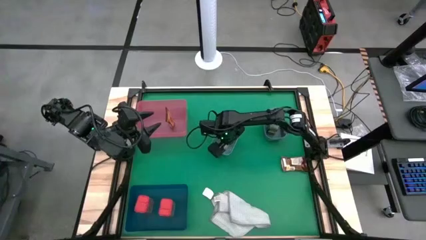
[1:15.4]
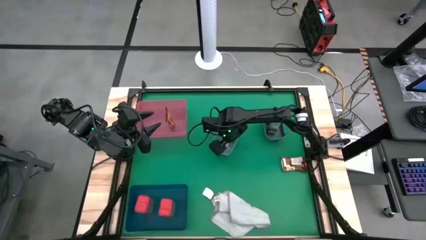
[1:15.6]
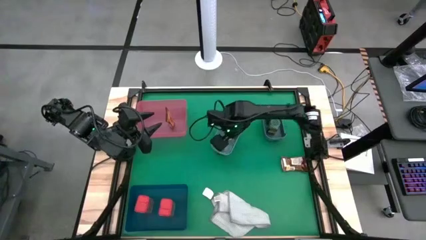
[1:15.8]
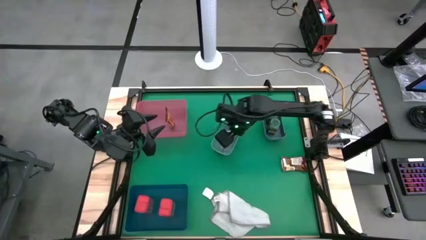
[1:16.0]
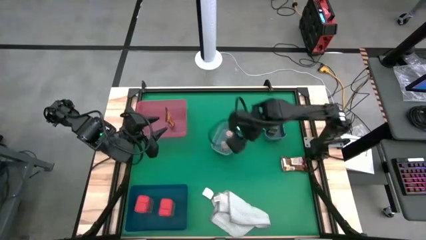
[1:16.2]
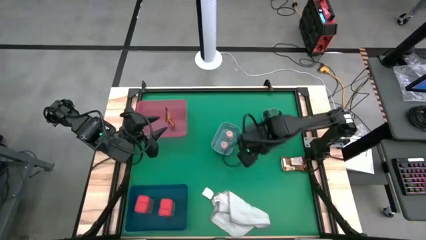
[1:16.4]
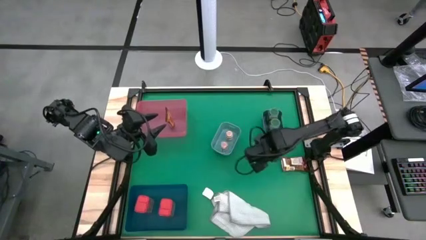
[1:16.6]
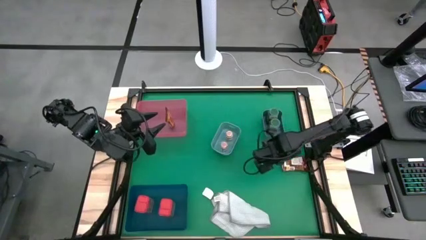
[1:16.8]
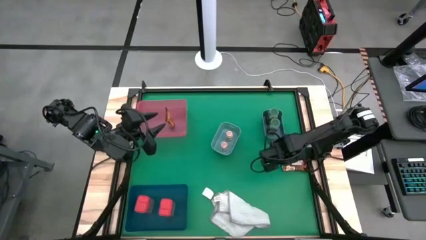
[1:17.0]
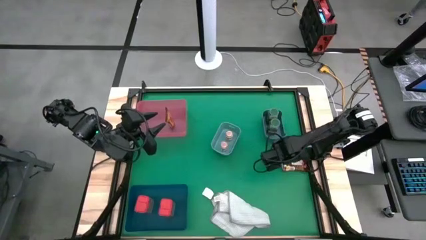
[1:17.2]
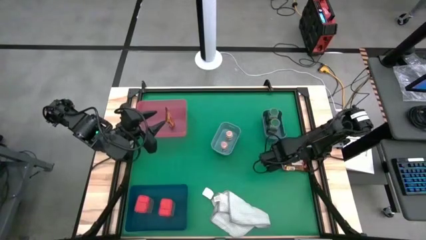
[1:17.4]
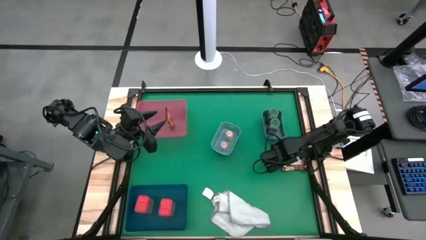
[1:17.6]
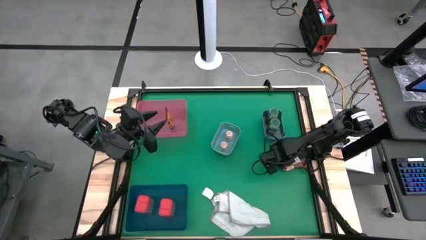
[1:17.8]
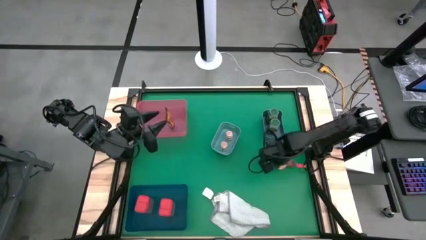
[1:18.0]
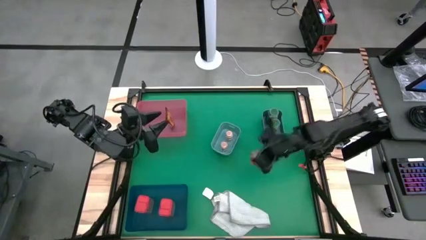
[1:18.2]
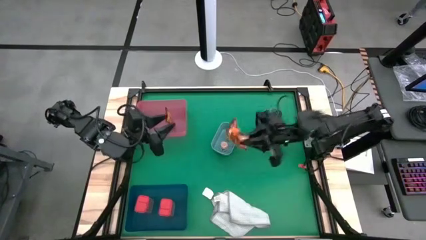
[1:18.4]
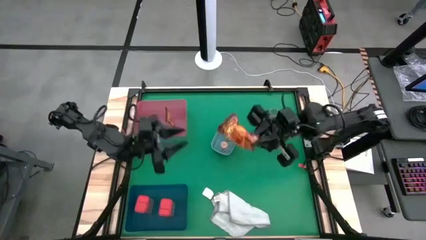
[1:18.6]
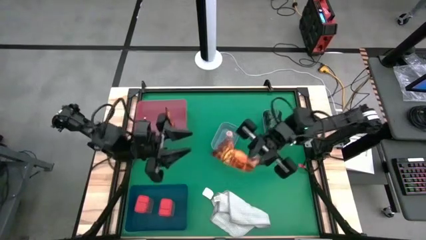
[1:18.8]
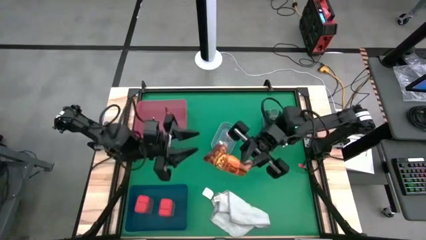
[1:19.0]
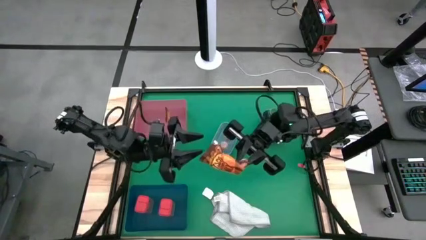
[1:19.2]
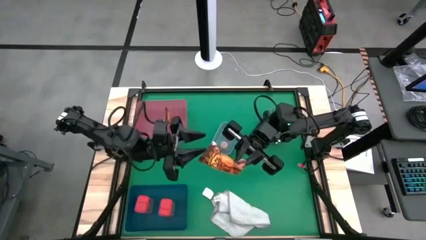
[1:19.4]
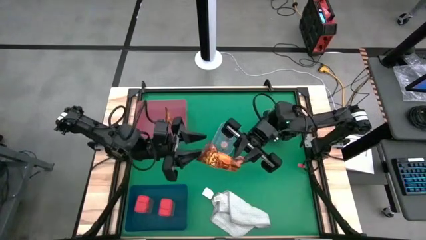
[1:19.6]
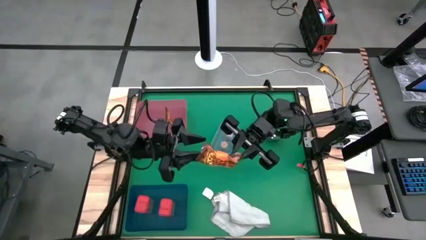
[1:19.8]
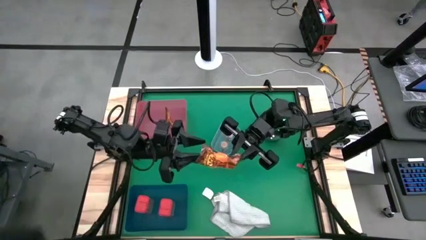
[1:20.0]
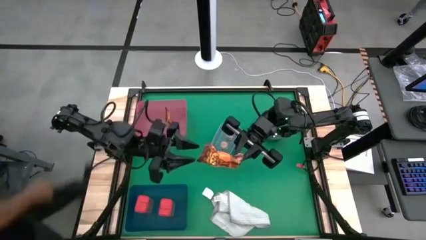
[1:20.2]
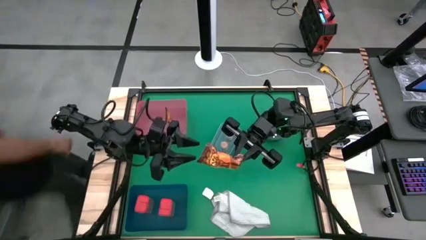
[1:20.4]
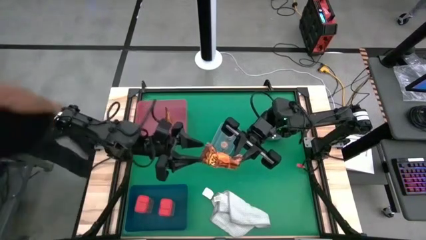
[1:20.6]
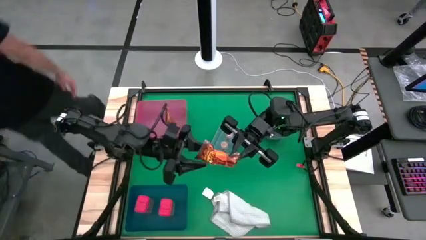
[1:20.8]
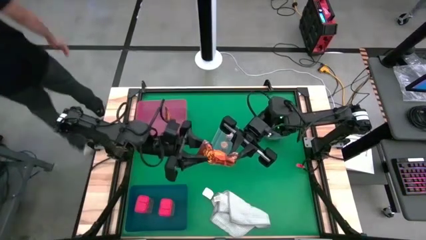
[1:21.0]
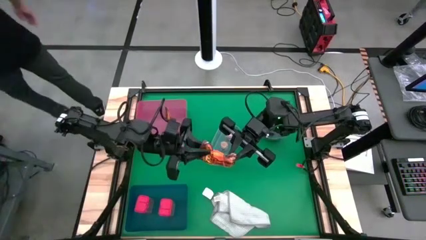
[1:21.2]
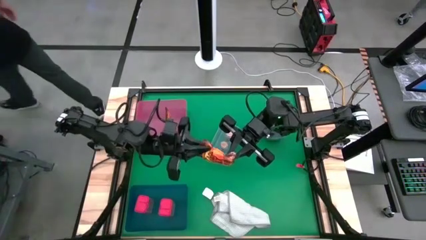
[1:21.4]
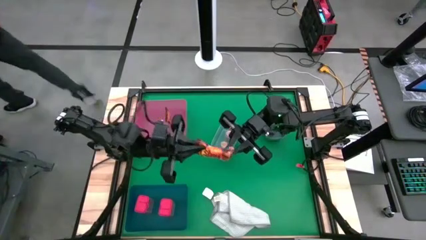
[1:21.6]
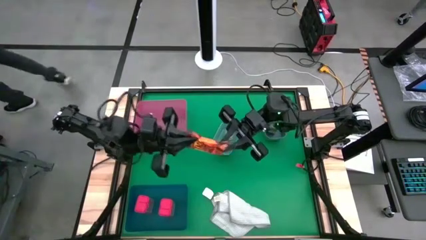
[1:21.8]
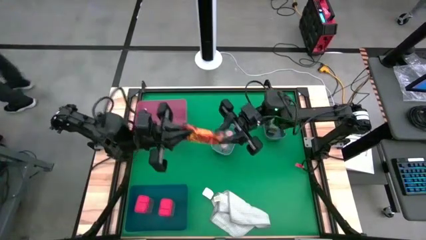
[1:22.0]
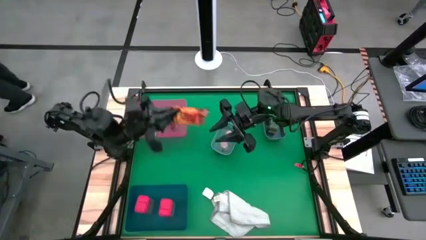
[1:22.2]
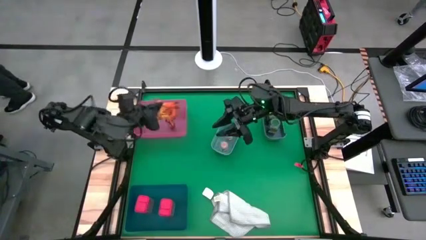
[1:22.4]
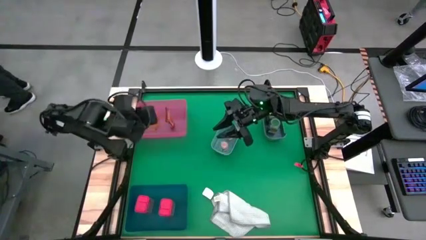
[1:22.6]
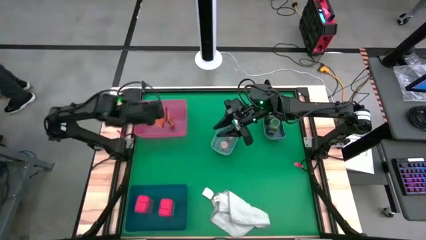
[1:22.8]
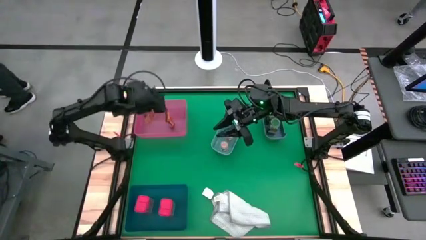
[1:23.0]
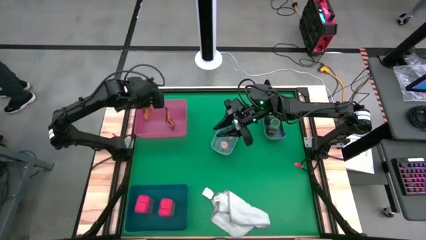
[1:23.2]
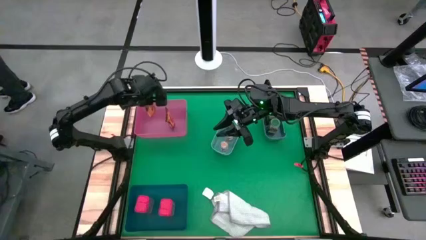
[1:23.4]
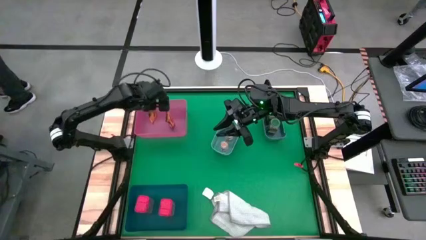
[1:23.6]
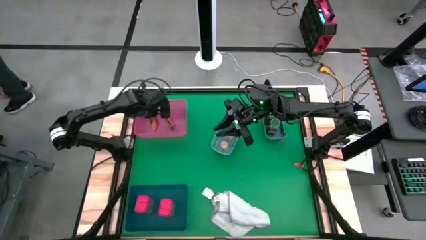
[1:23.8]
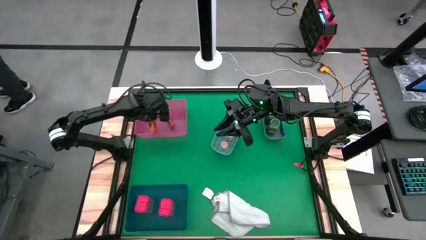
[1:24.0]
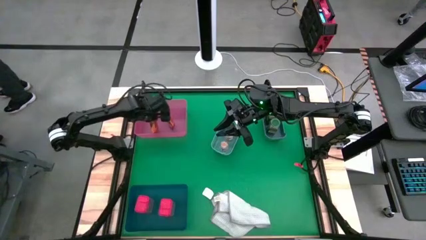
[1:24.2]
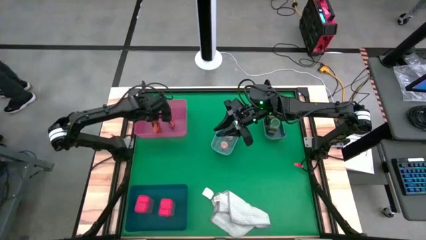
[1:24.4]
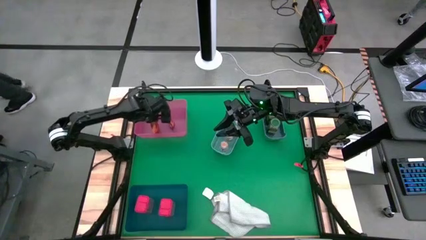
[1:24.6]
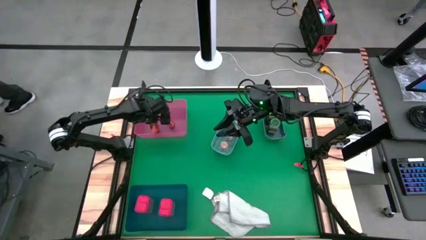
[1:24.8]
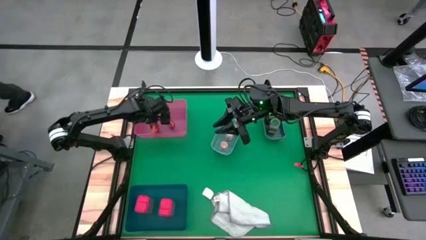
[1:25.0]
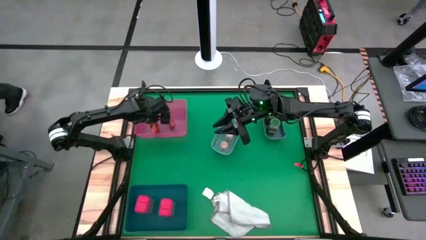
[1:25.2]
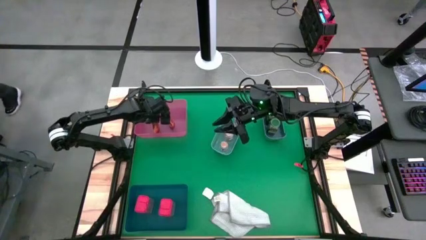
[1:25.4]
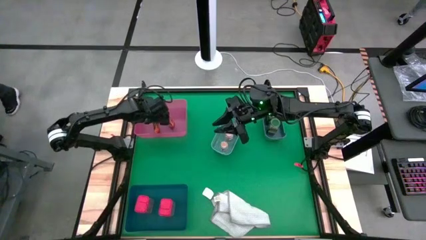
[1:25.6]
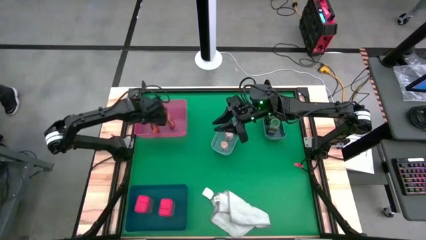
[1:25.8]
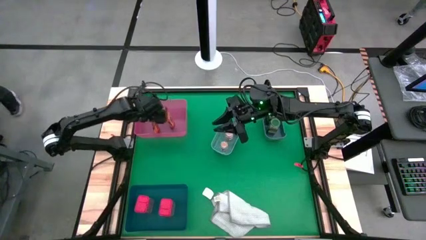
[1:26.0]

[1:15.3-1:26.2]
Task: Sort spices by type
Put the orange seasoning pack into the red bin
